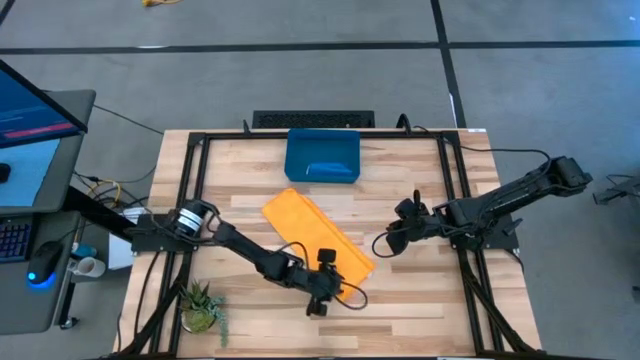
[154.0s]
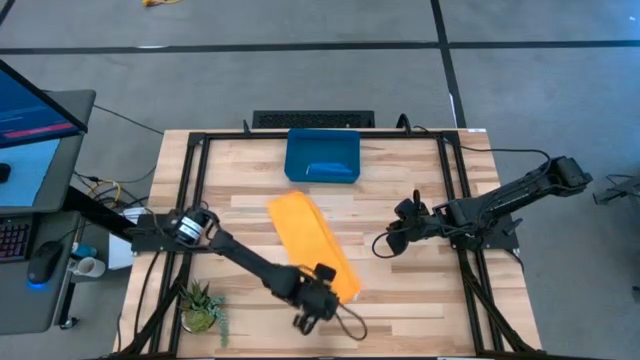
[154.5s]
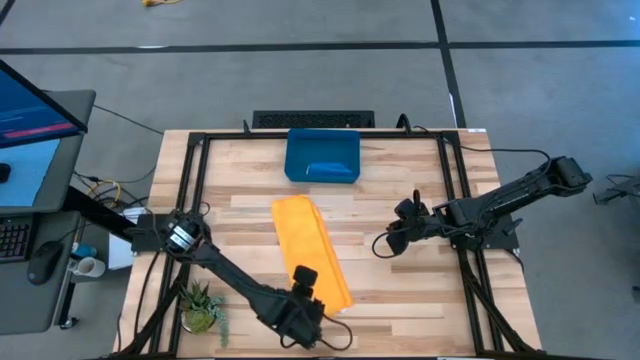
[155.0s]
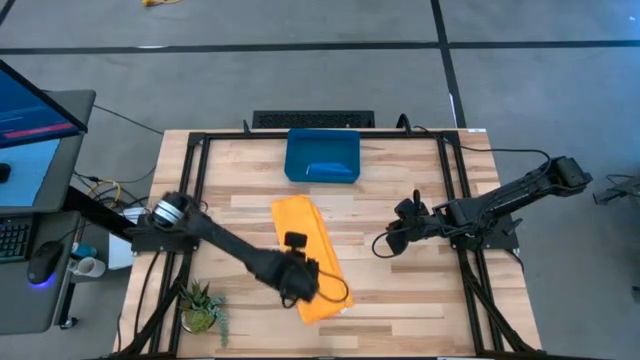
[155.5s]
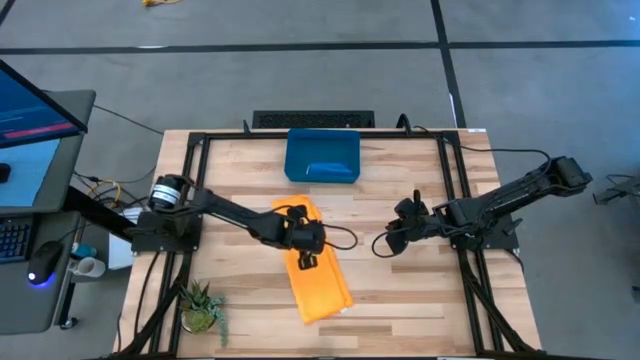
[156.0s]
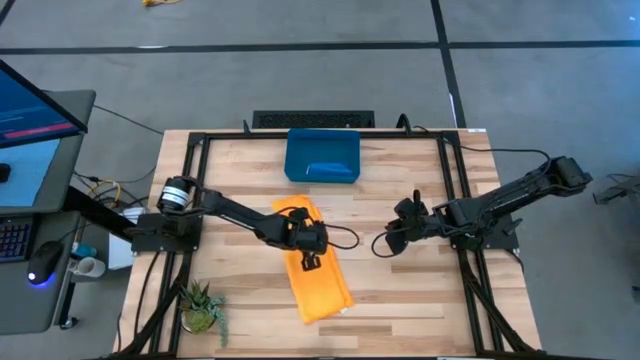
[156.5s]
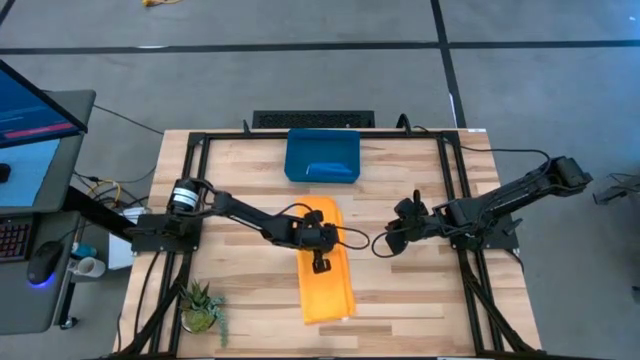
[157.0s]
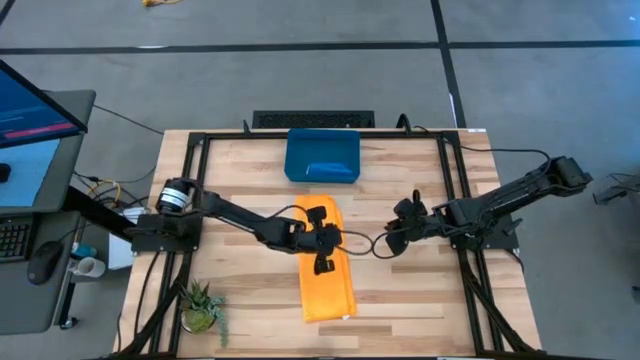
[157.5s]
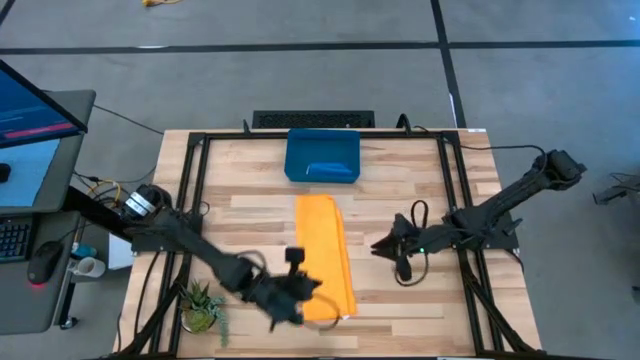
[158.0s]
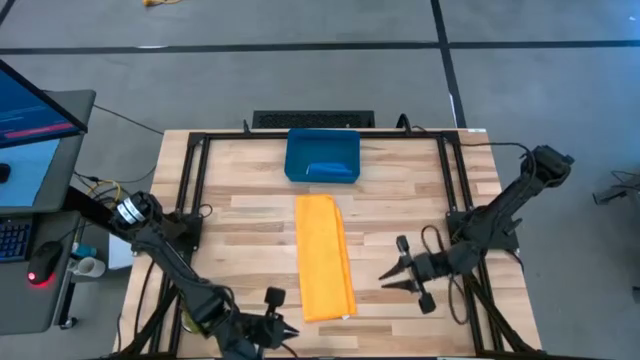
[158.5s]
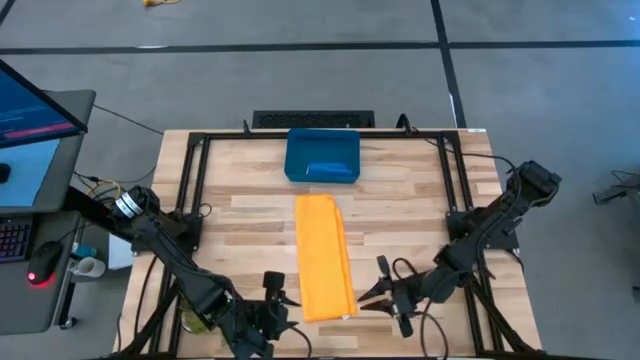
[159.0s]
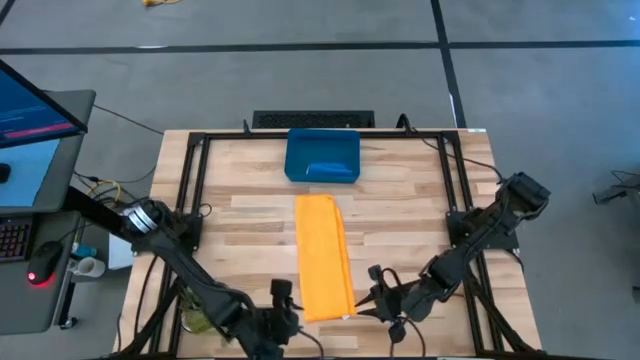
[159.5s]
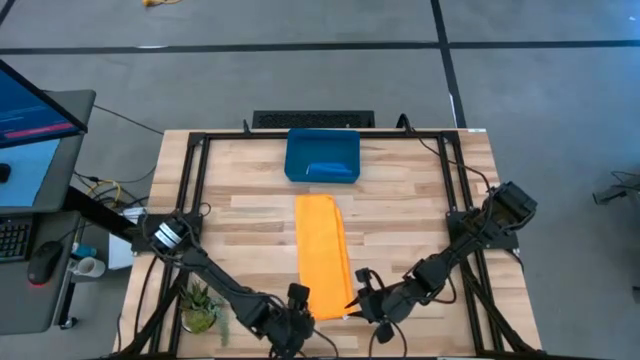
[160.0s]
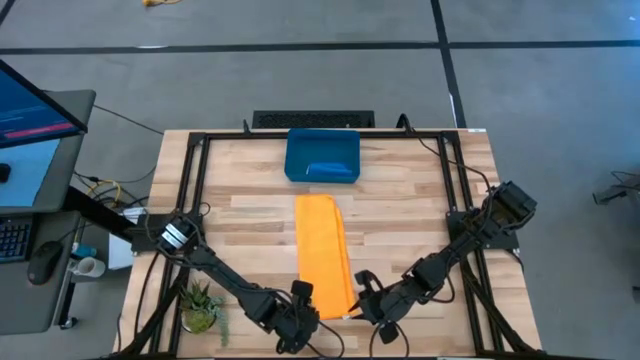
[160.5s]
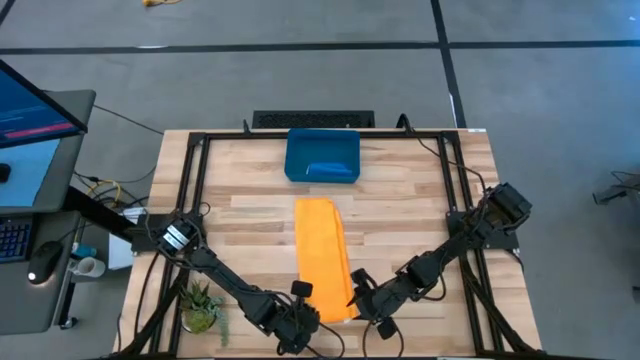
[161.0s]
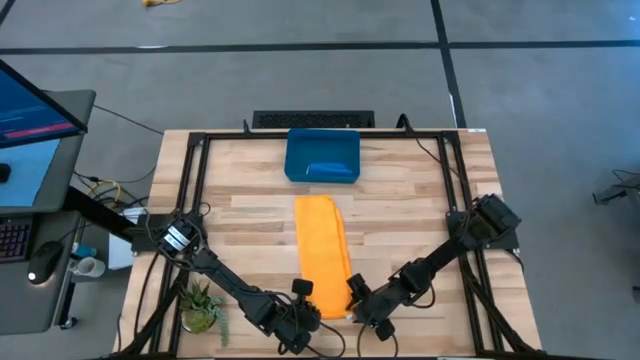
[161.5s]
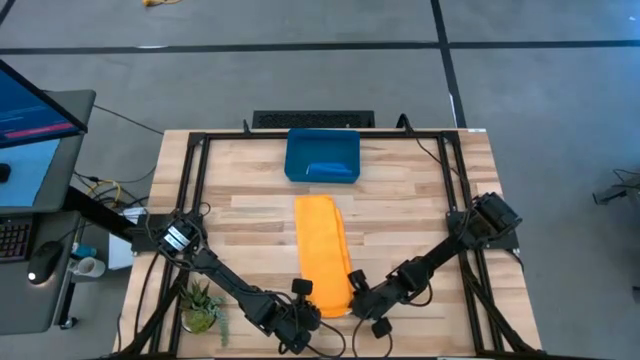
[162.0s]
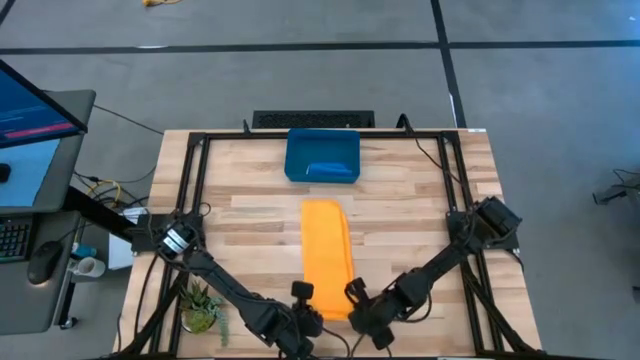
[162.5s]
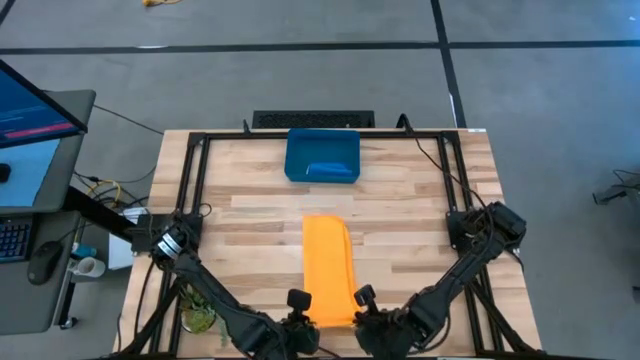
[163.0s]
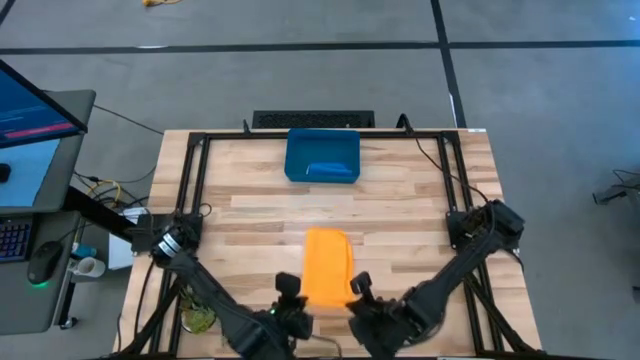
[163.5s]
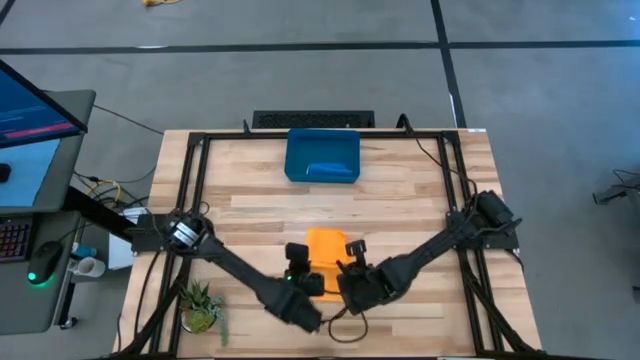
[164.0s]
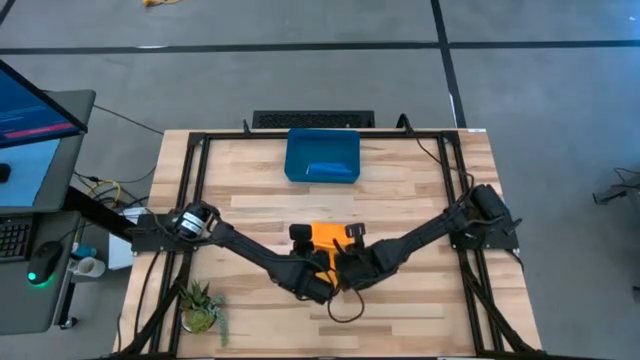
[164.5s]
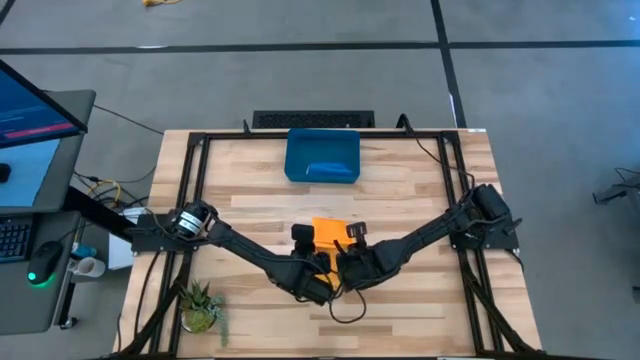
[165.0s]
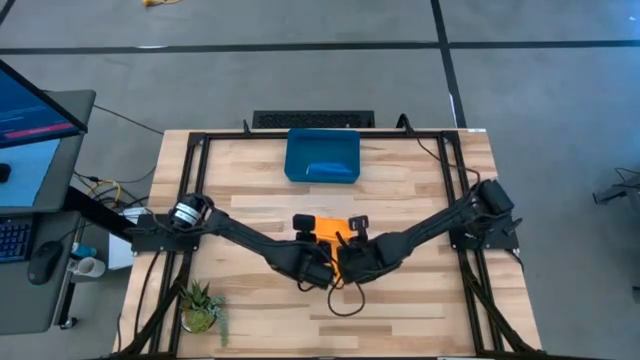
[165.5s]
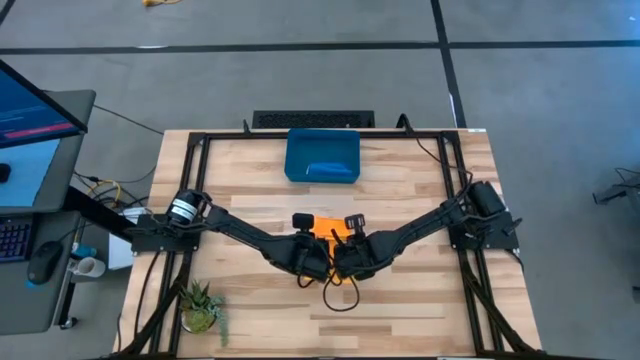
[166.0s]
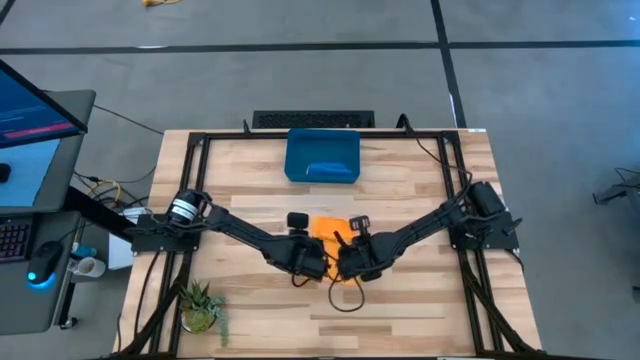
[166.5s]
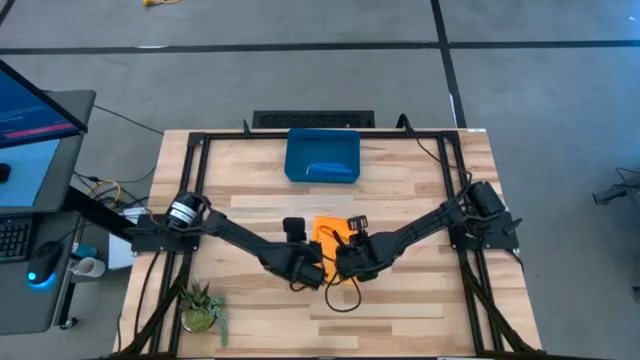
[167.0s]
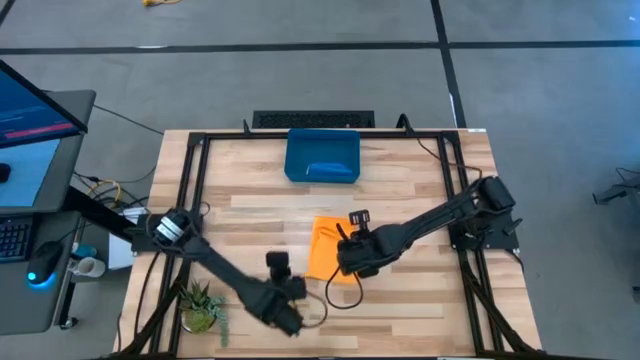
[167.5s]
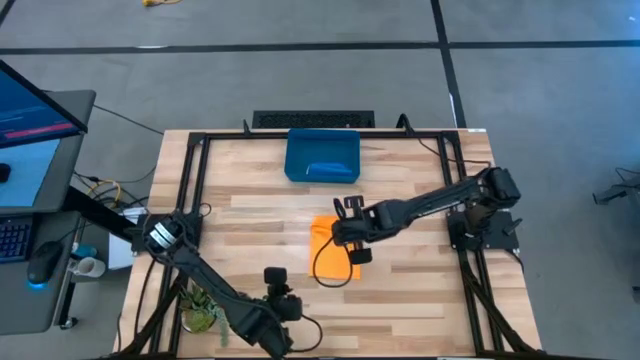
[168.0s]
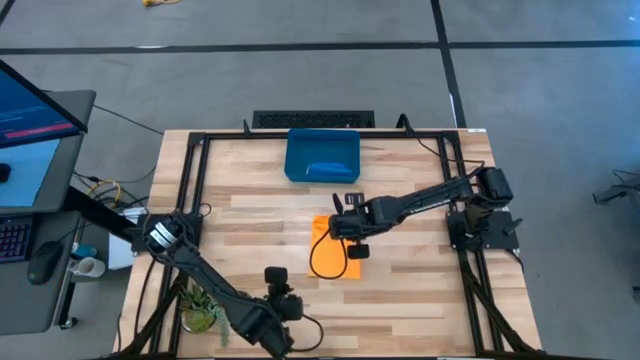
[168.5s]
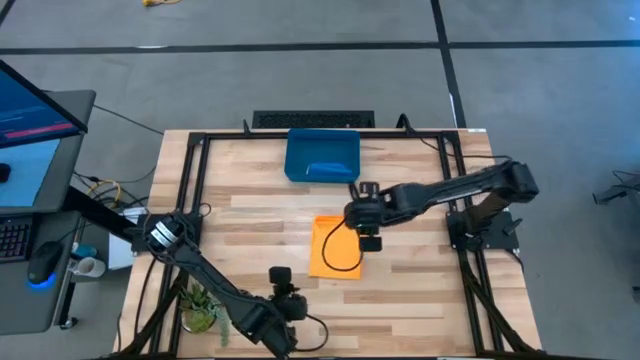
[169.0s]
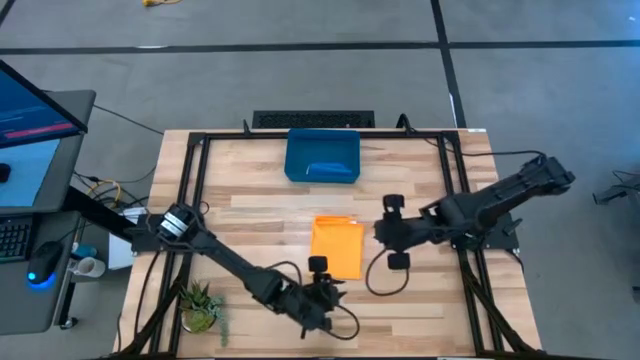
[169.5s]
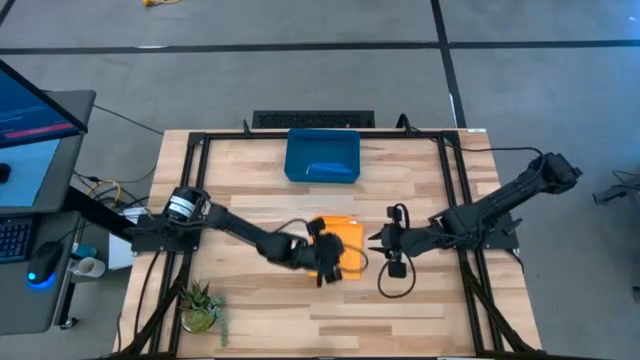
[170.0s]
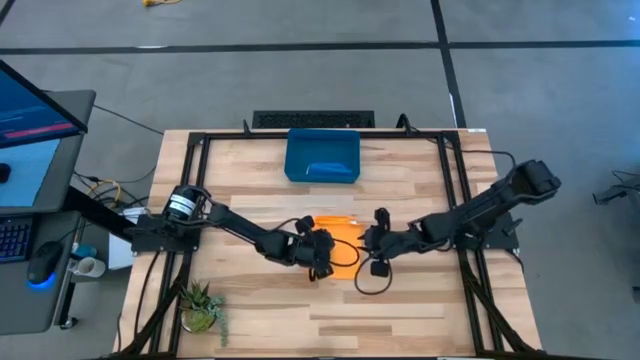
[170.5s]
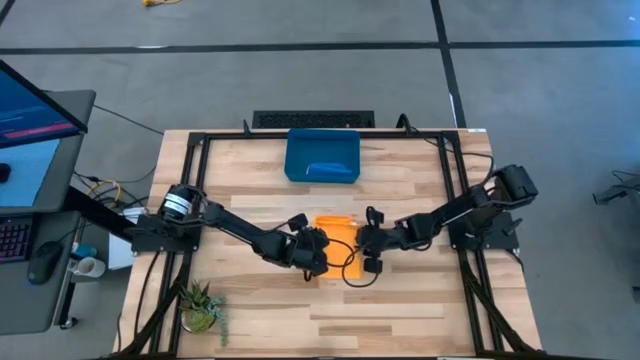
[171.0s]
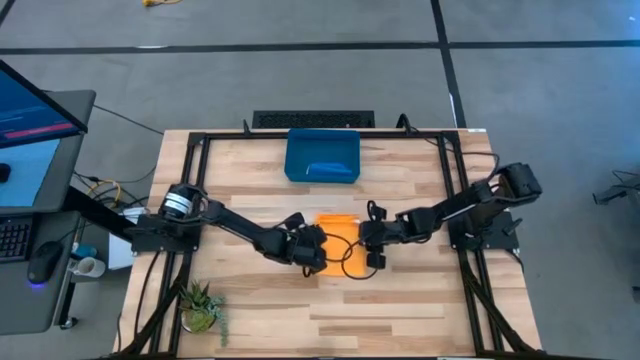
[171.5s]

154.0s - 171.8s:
Task: Roll microfiber towels into tight, uniform cylinder then place into a basket
Fold the orange microfiber towel
